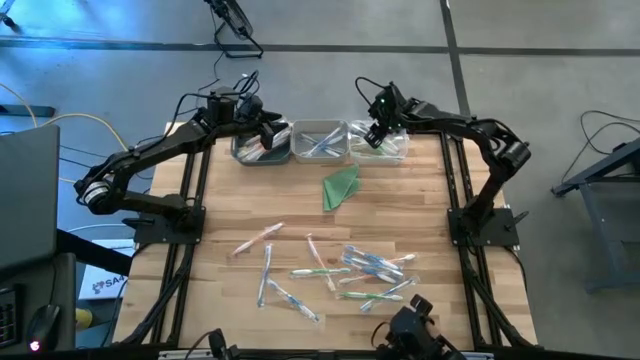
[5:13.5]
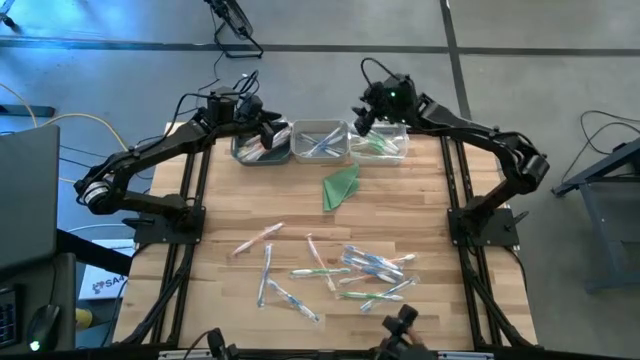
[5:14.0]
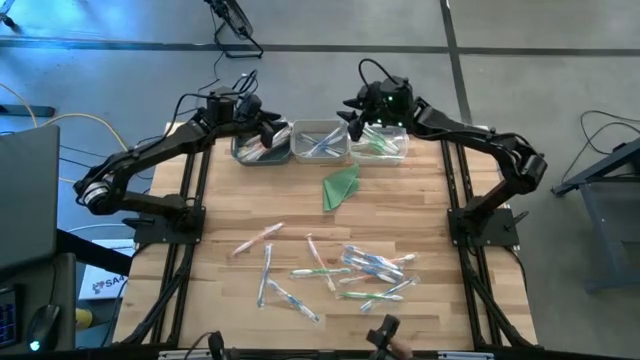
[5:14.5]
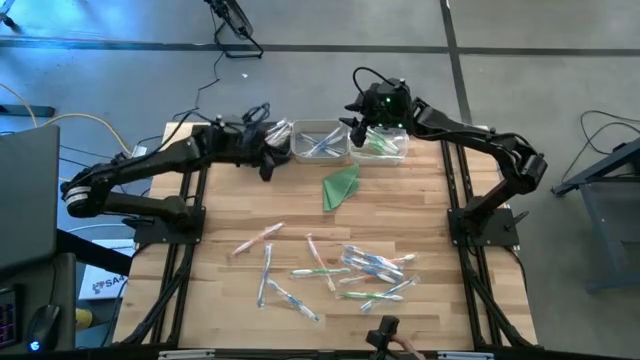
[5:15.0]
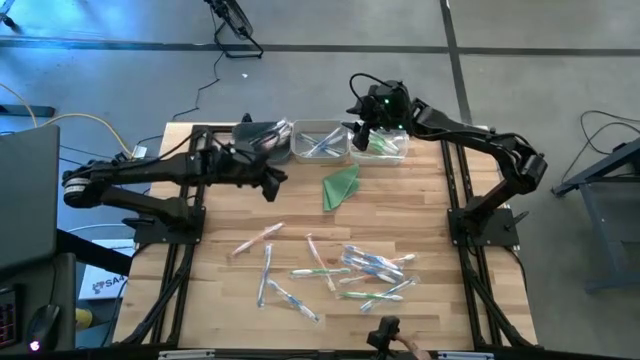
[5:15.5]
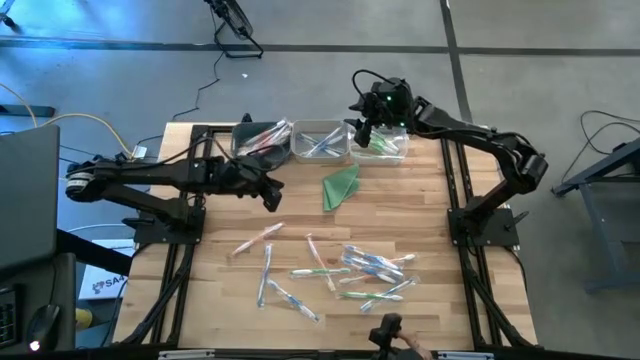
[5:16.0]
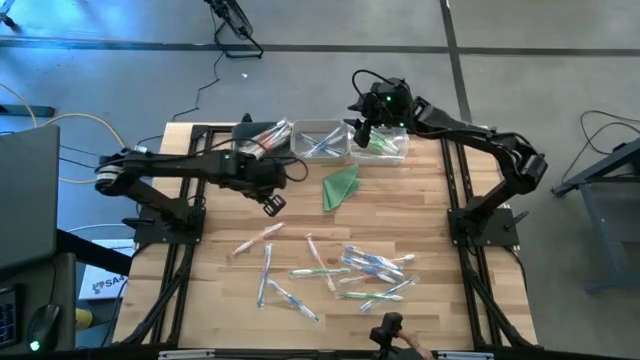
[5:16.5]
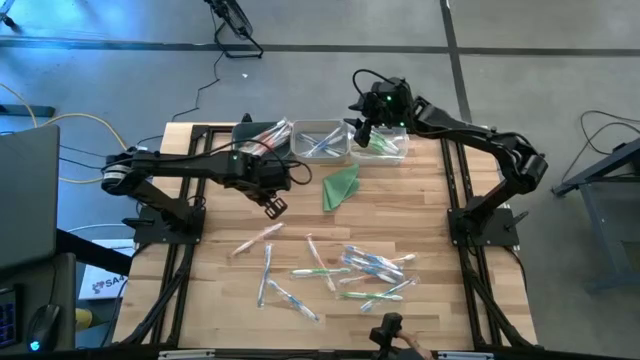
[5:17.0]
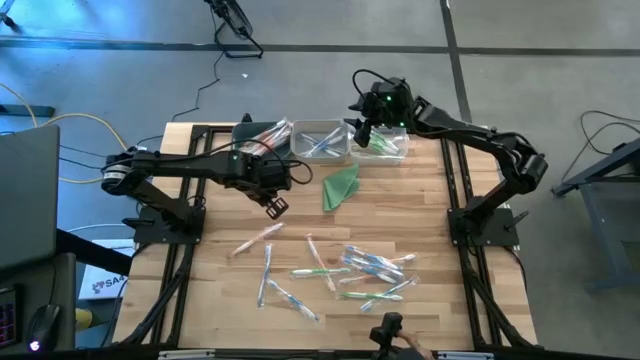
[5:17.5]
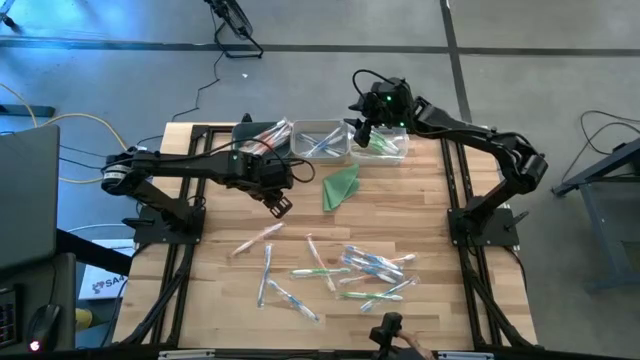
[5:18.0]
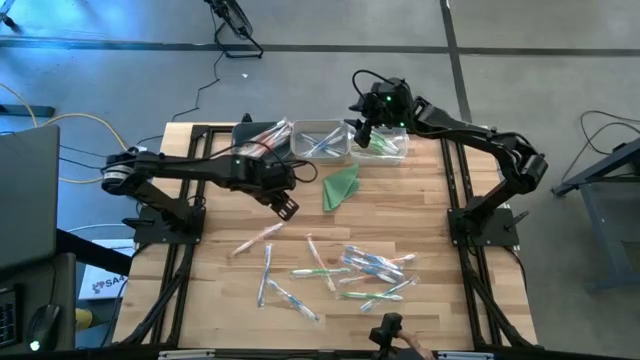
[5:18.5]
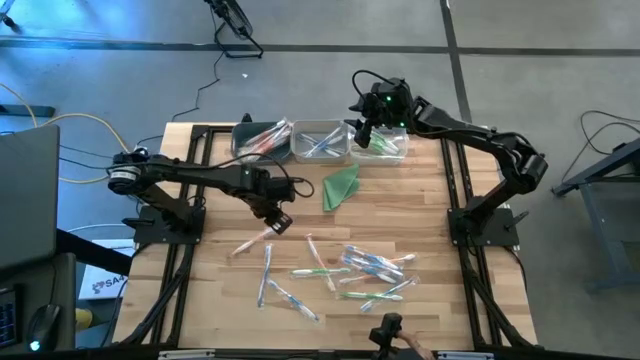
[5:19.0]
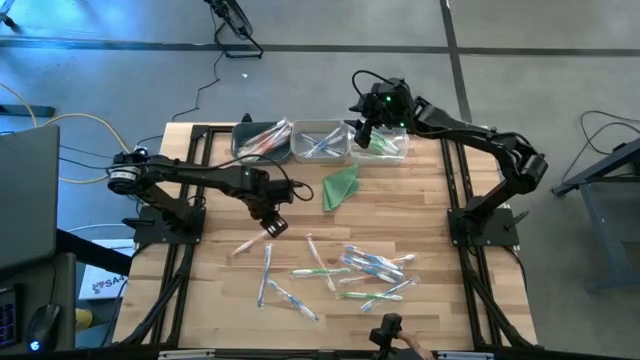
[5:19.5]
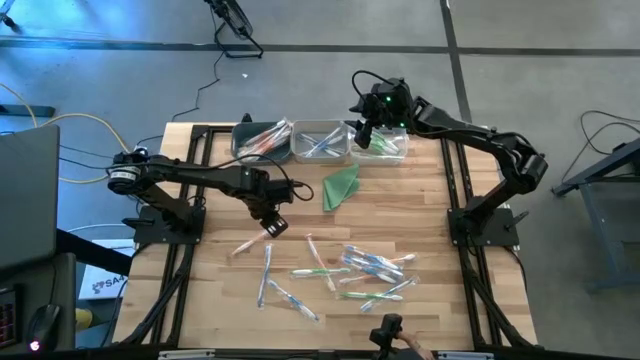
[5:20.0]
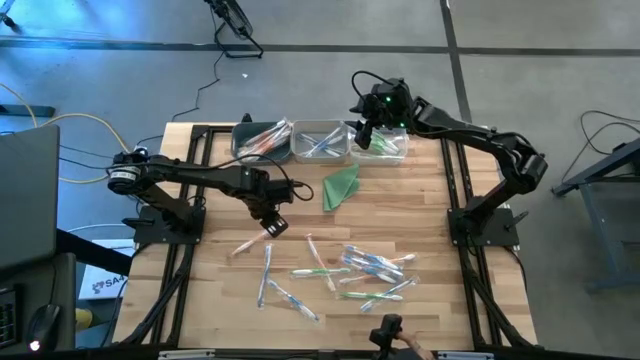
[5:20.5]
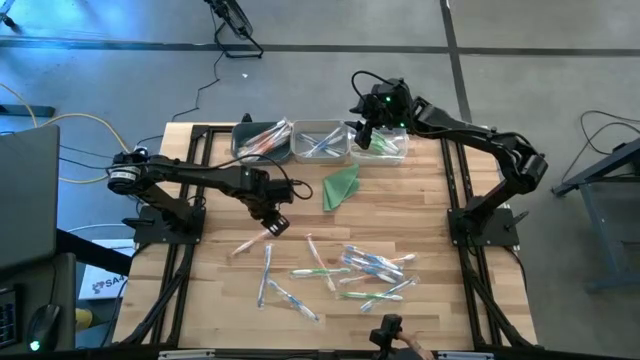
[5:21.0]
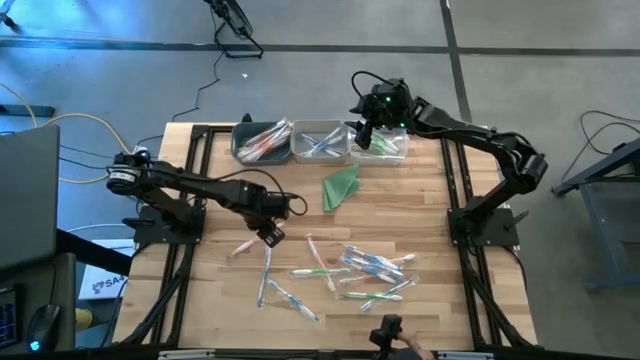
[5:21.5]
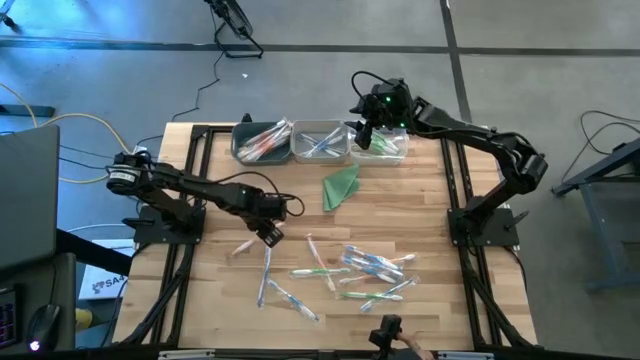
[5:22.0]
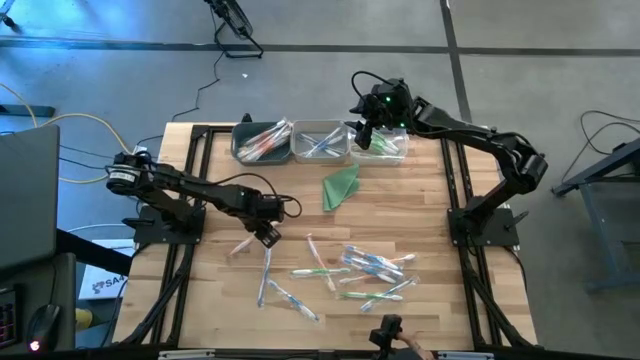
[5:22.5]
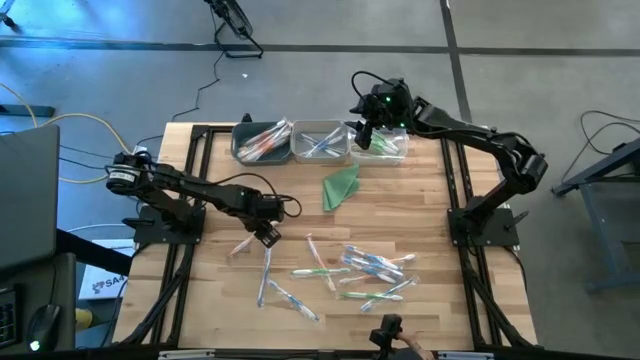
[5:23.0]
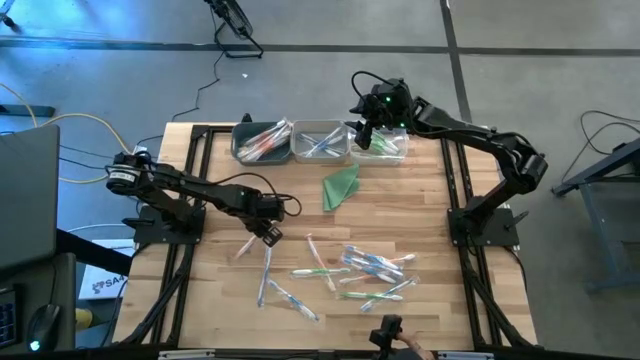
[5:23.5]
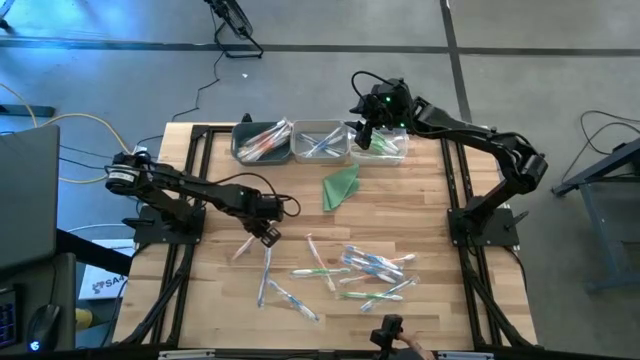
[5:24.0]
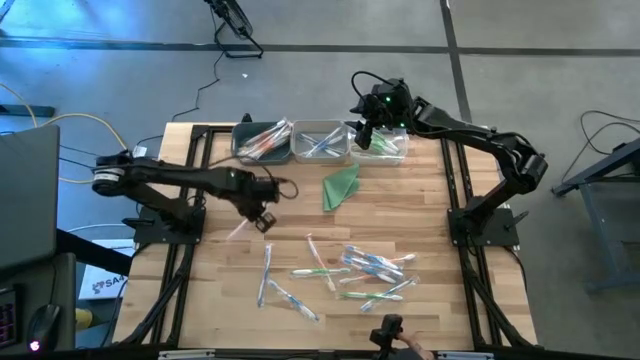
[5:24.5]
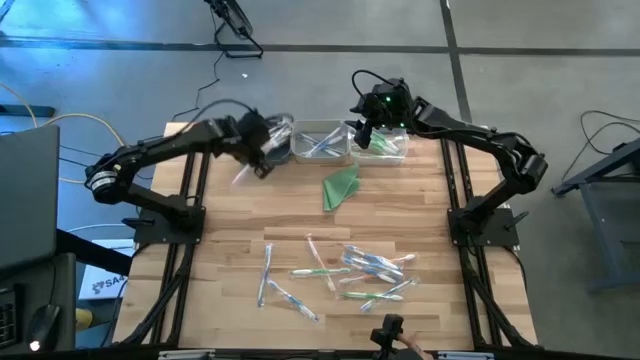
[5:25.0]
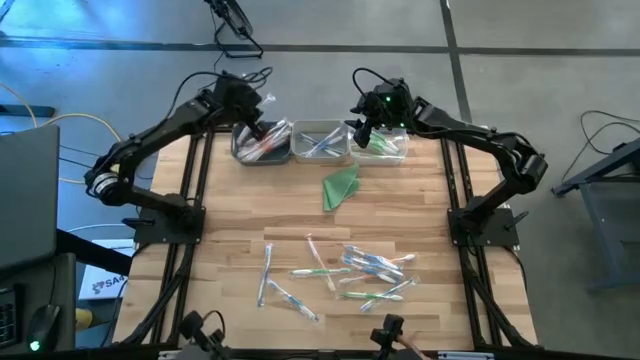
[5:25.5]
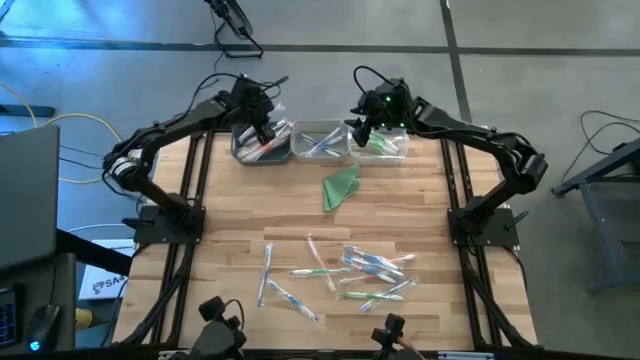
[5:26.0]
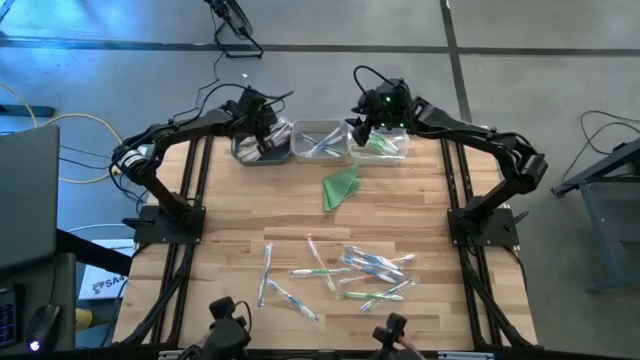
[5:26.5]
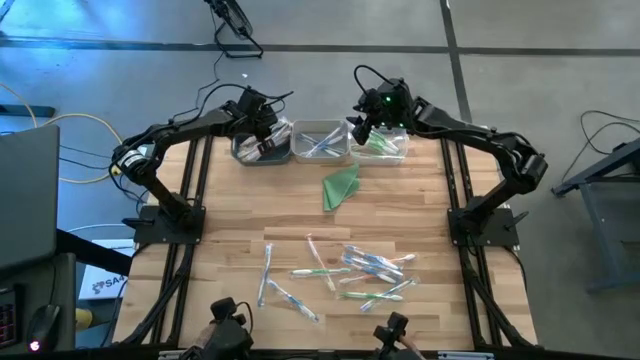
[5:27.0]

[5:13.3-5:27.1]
Task: Pick & Place Toothbrushes
Put the orange toothbrush into the dark blue bin

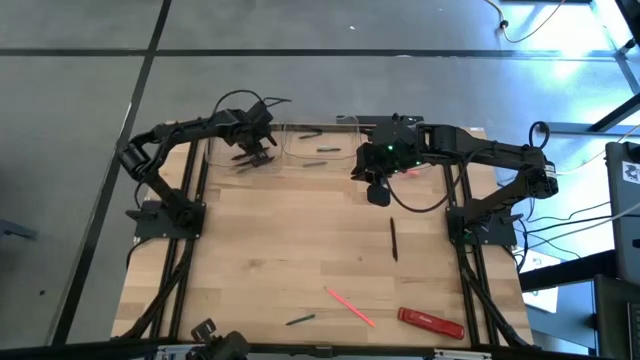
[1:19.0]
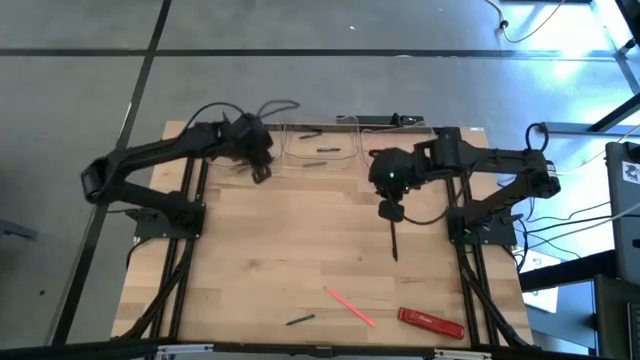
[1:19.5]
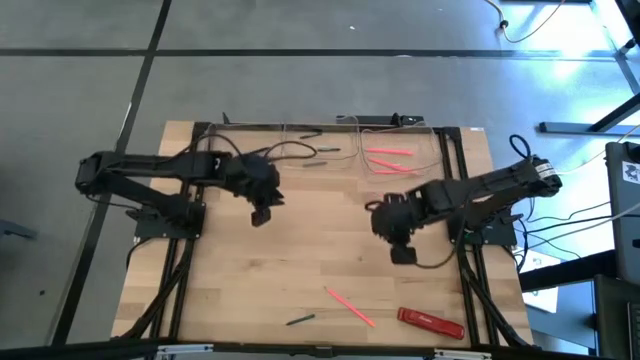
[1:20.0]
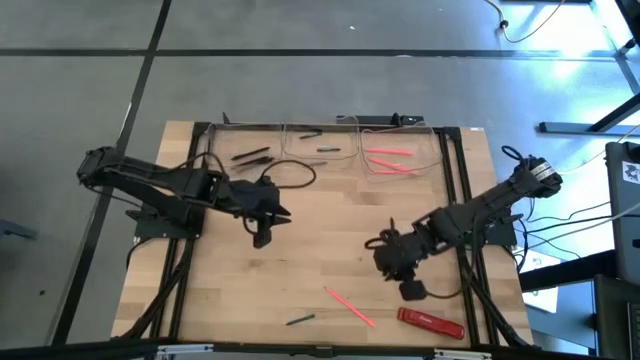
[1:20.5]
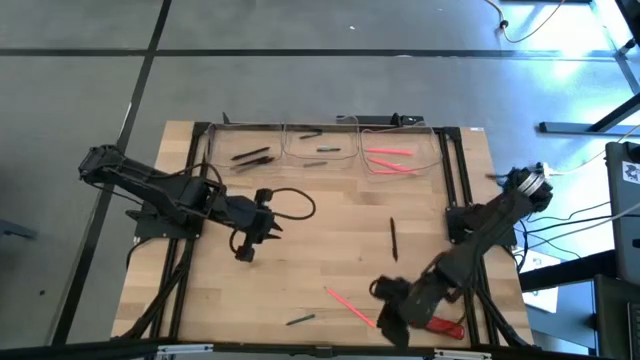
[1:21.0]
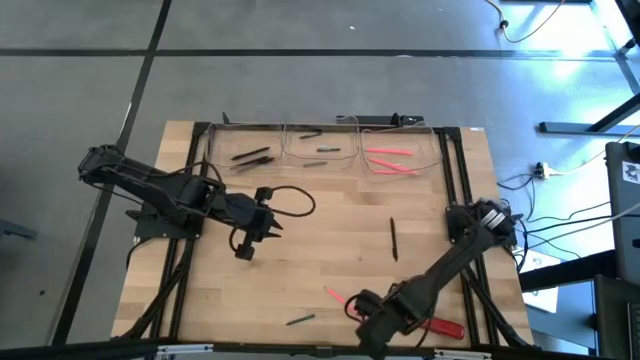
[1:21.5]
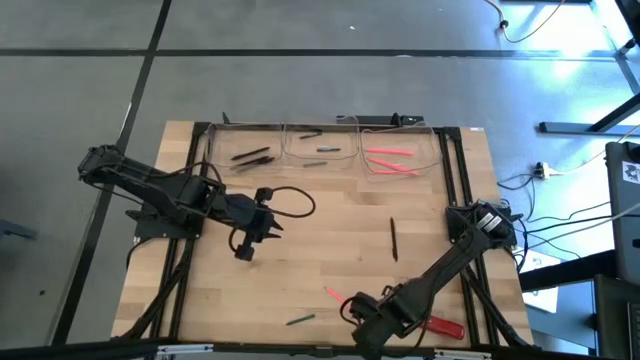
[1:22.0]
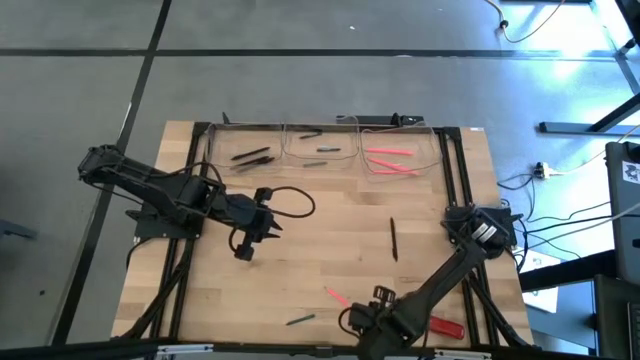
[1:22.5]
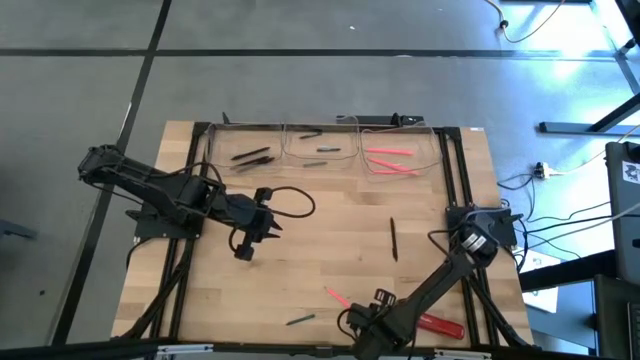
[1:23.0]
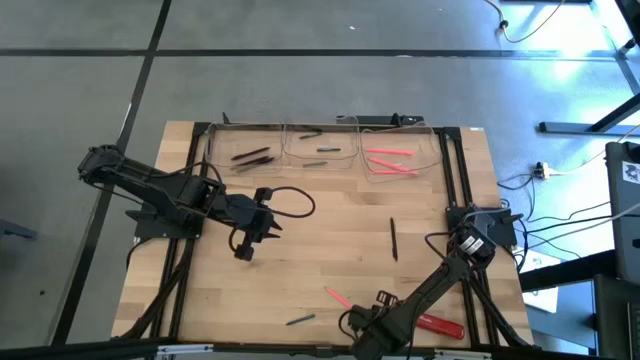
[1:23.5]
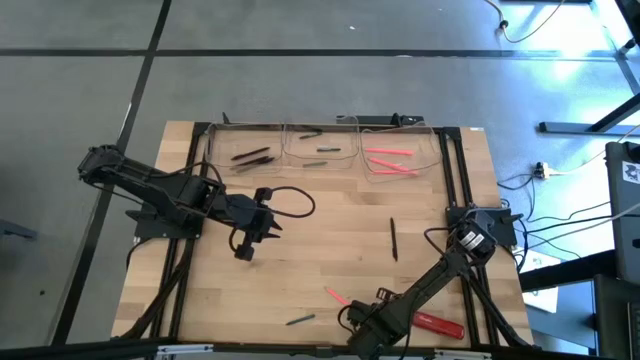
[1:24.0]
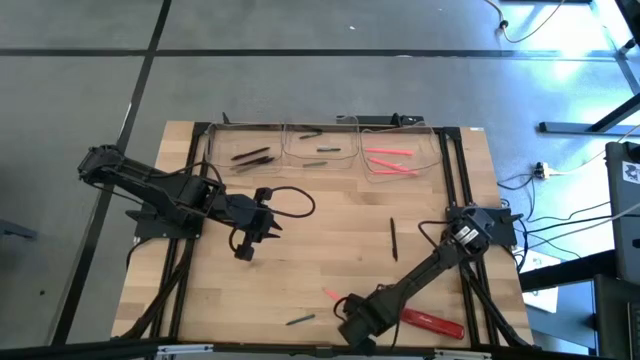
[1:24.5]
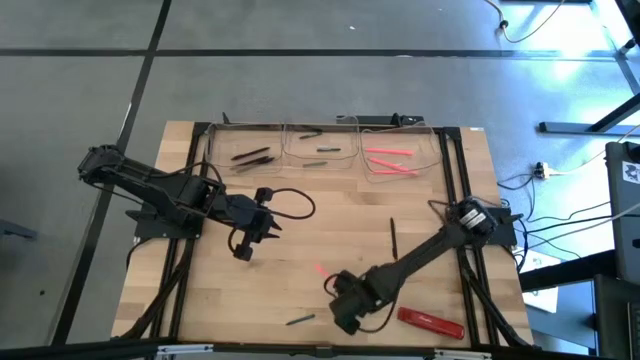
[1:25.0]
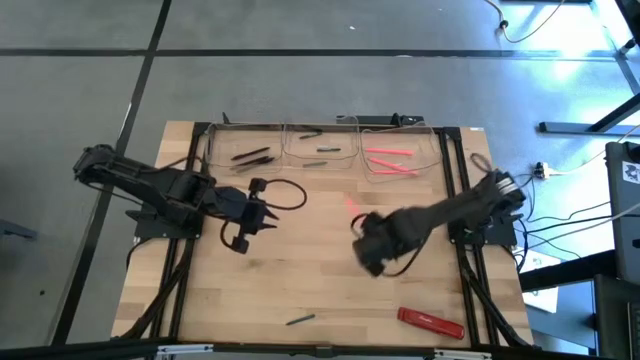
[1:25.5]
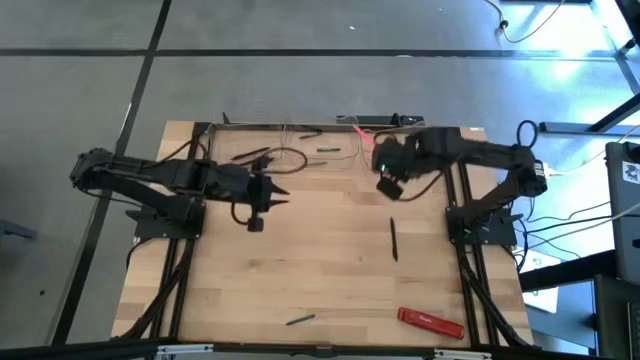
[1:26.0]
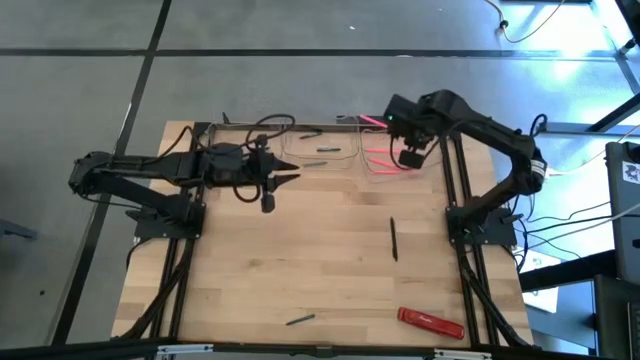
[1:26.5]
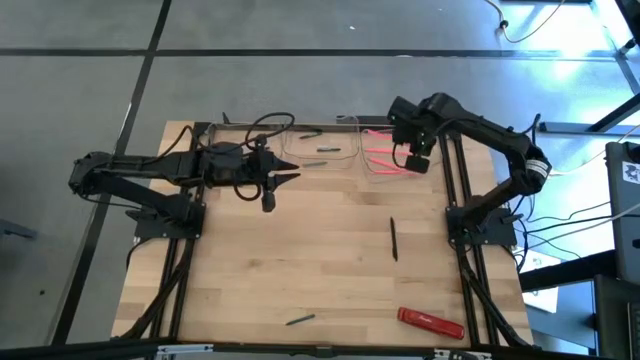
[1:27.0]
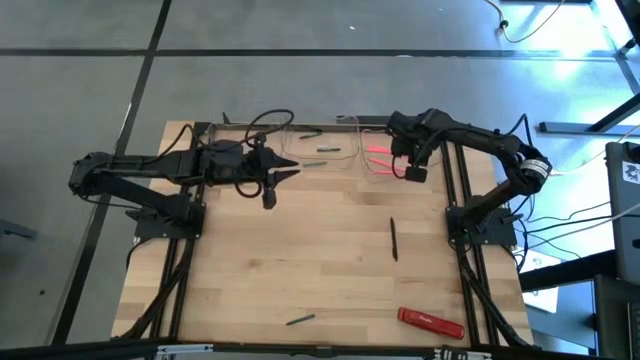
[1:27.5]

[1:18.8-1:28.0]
Task: Sort crayons/erasers/pens/pencils in bins
Put the pink pencil into the right transparent bin
